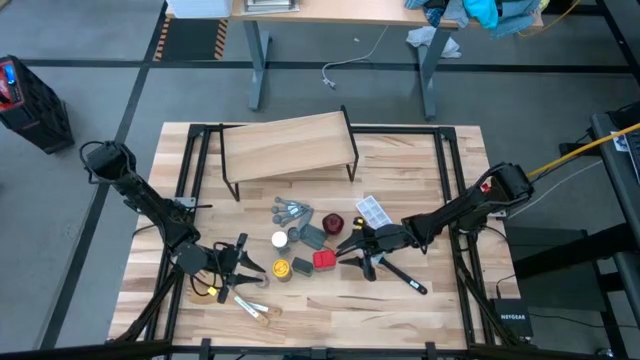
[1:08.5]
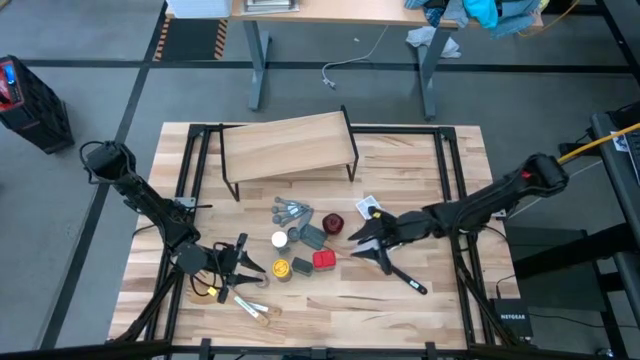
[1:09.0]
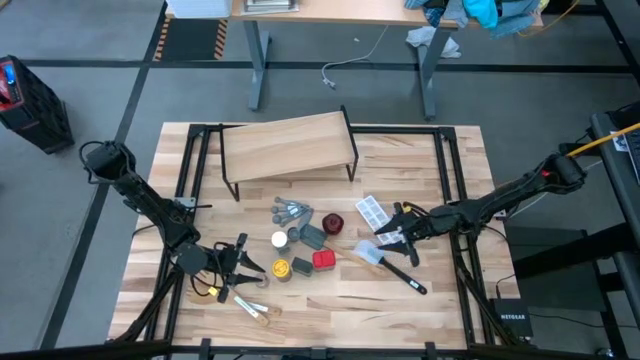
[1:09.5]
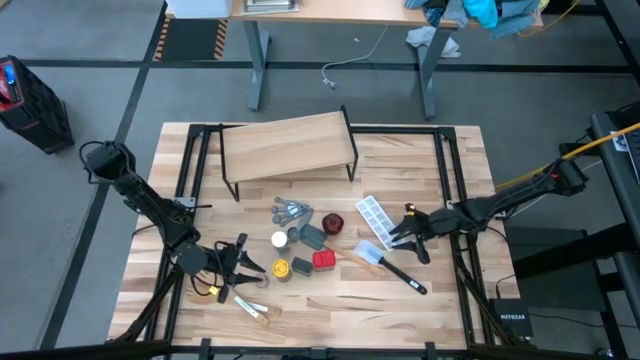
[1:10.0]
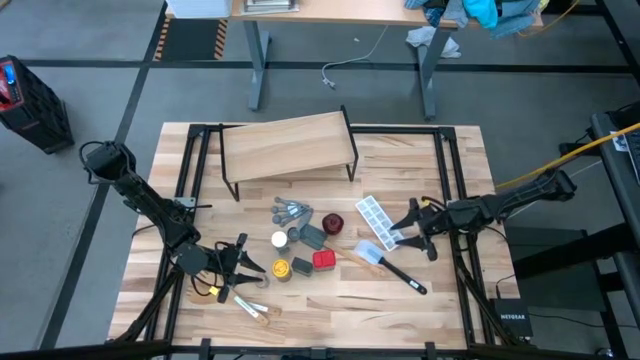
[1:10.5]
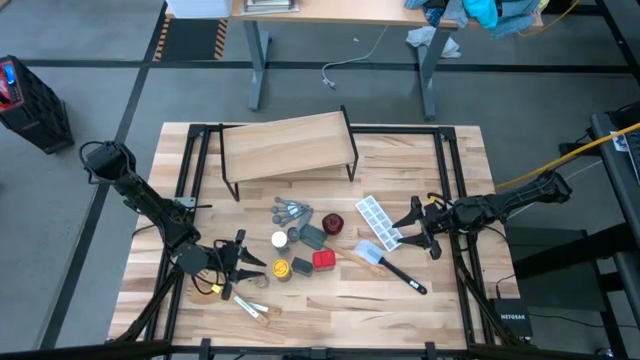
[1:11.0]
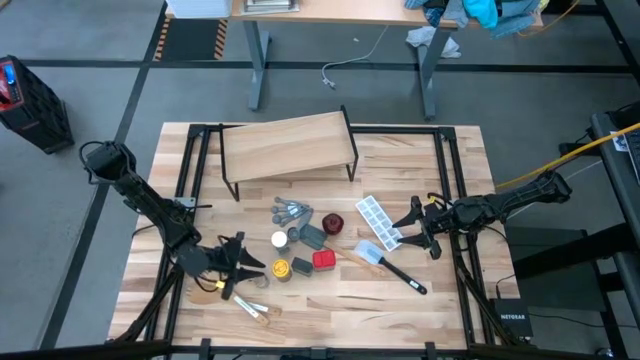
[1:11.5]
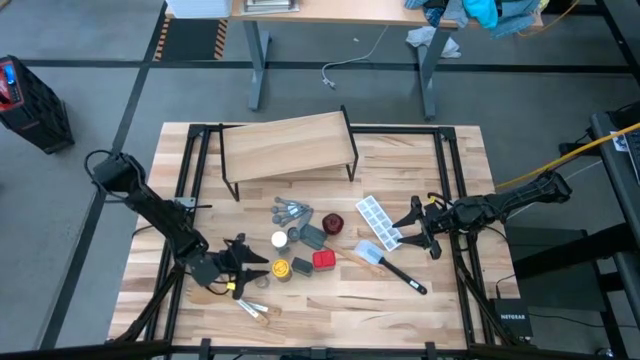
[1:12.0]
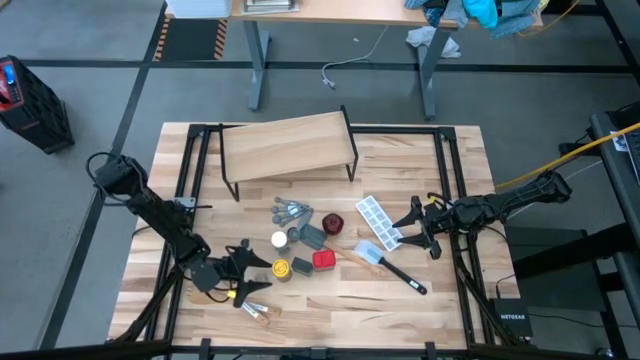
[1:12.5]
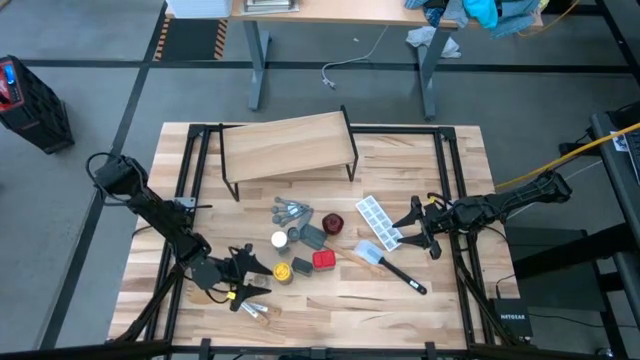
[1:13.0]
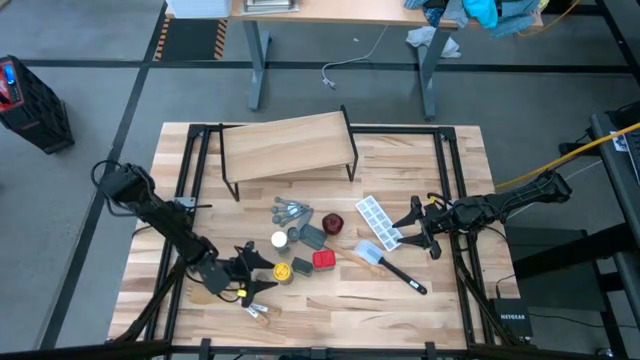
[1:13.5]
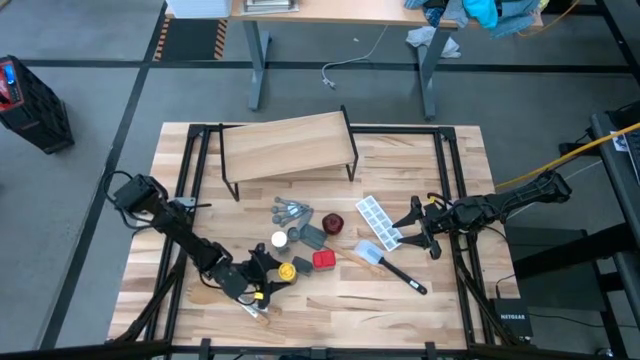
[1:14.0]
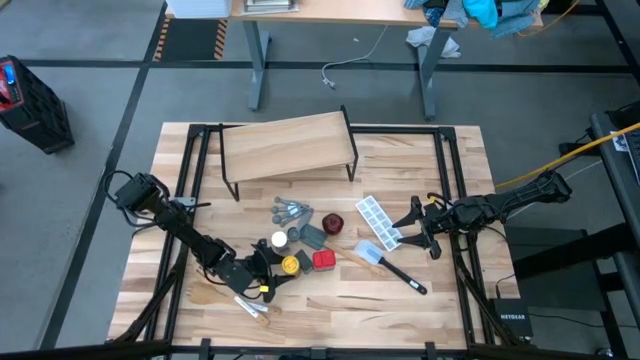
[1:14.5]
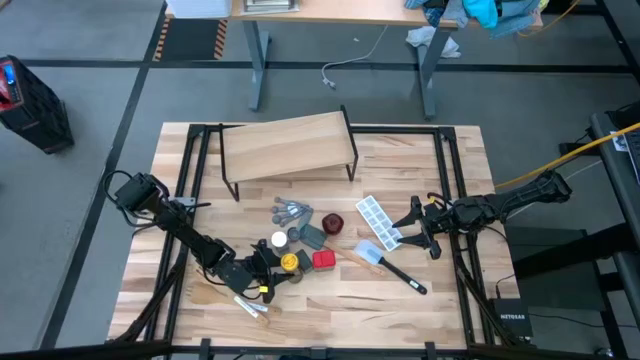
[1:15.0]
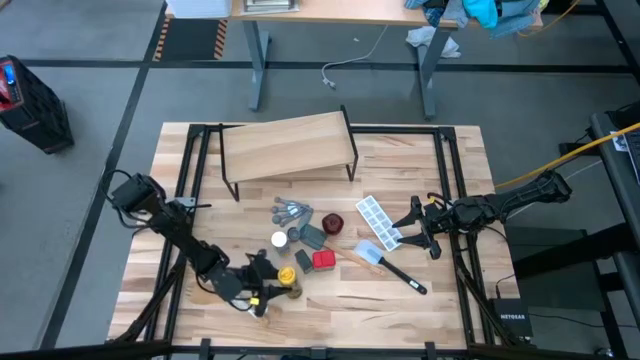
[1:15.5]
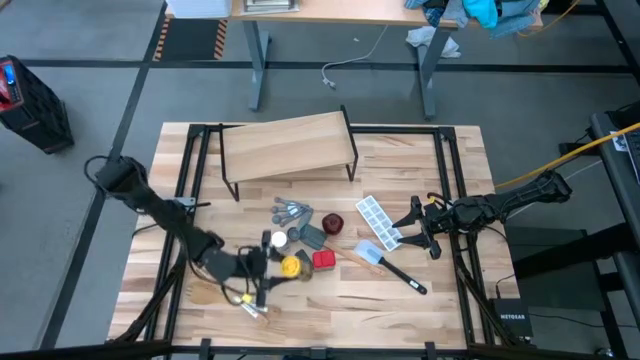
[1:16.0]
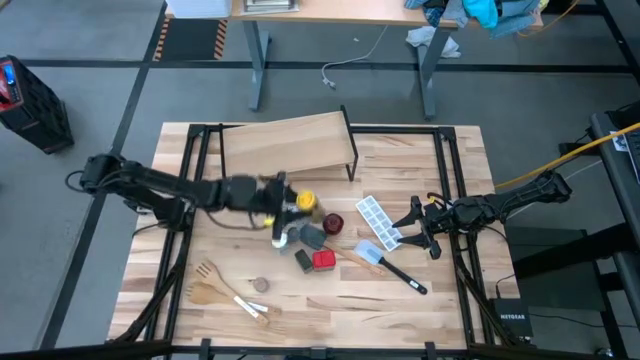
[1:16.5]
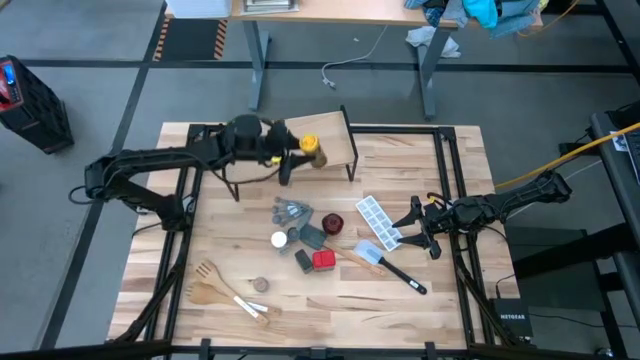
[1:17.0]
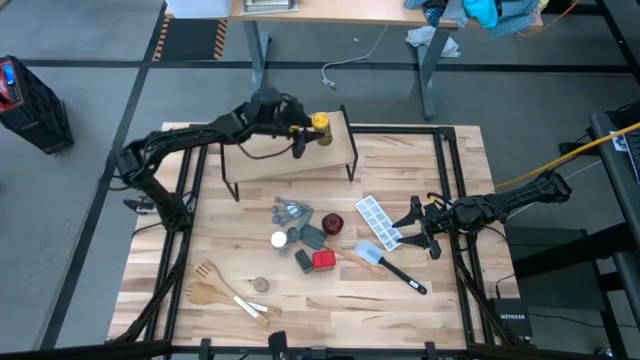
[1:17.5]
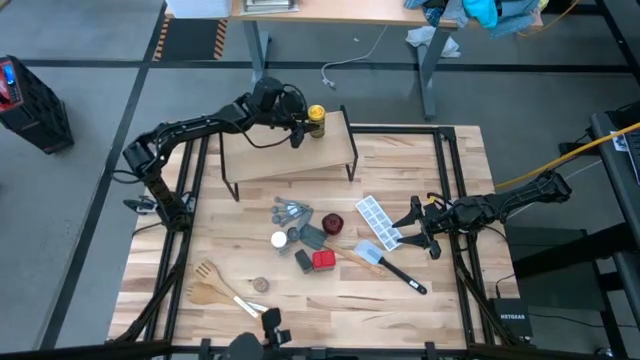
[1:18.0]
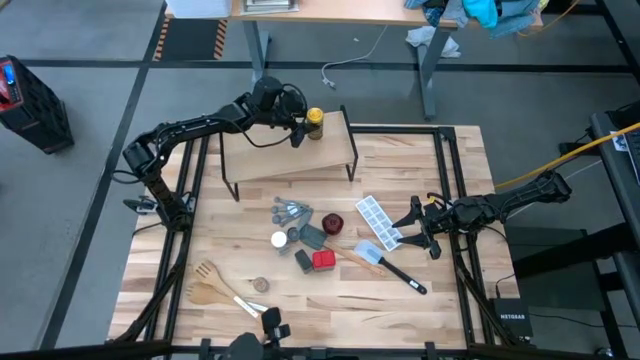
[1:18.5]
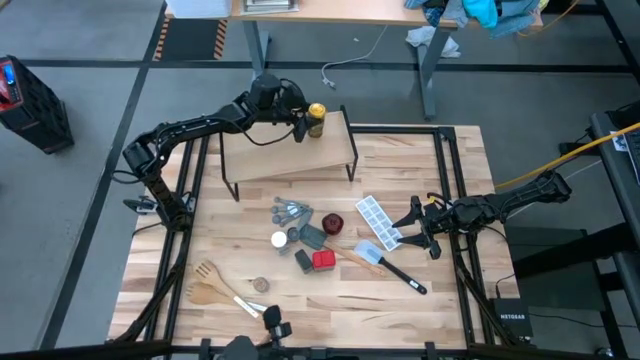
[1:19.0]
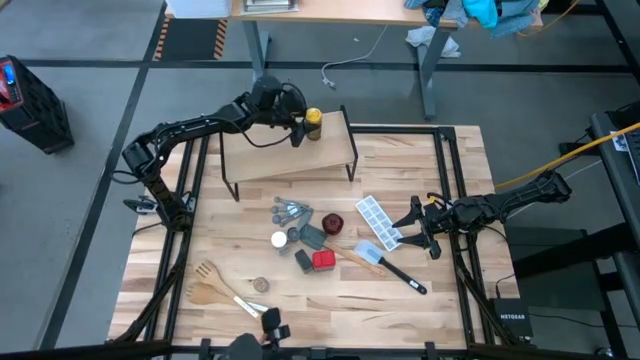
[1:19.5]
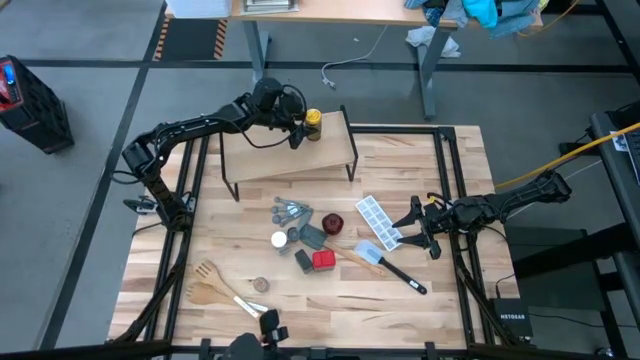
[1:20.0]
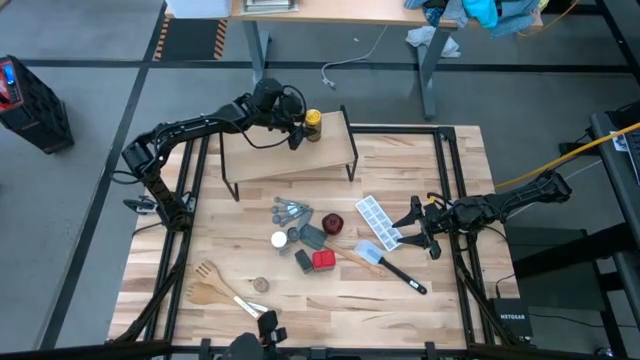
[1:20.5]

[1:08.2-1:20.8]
Task: Shelf spices
Put the yellow seasoning bottle on the shelf

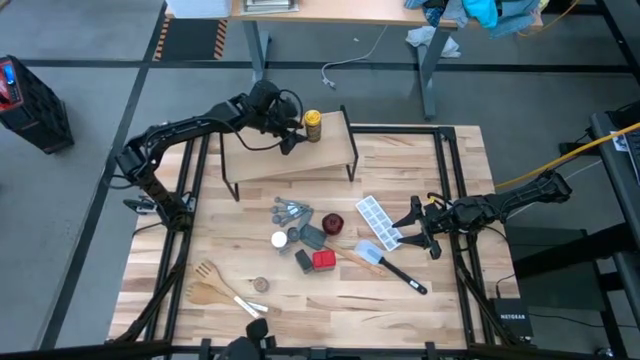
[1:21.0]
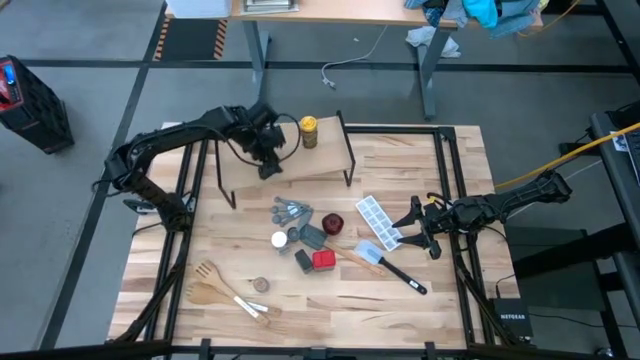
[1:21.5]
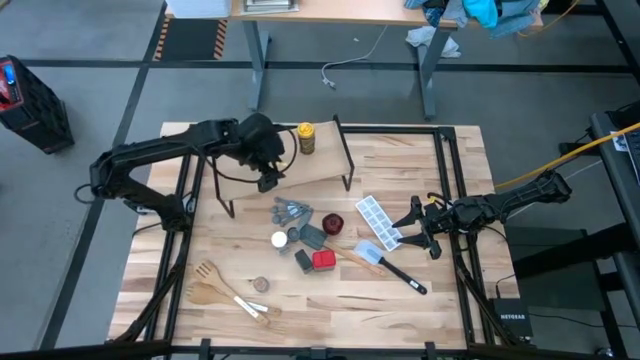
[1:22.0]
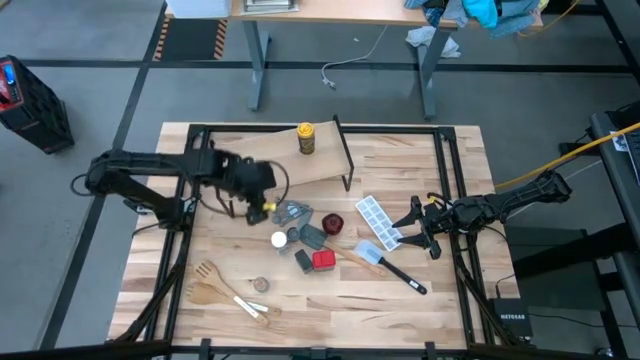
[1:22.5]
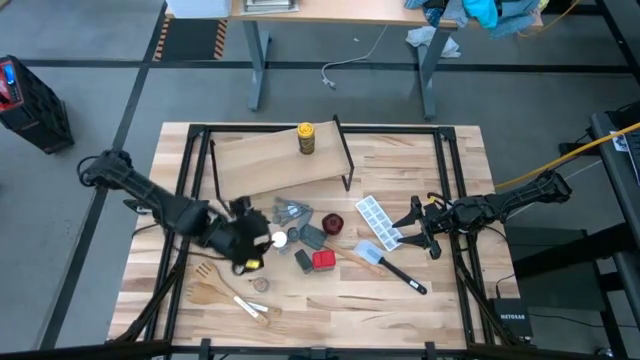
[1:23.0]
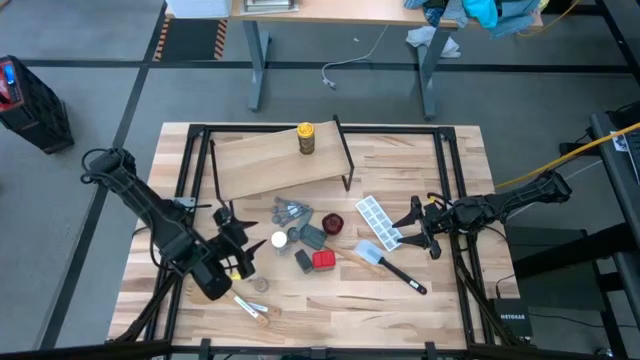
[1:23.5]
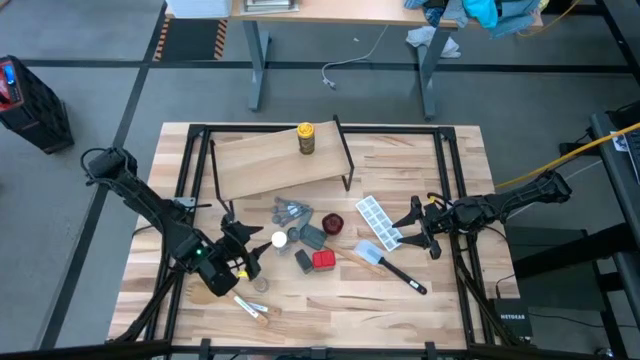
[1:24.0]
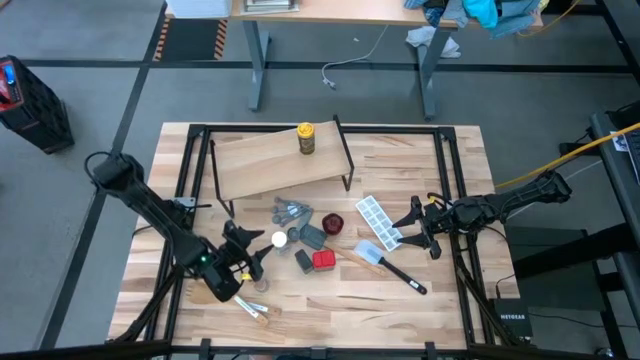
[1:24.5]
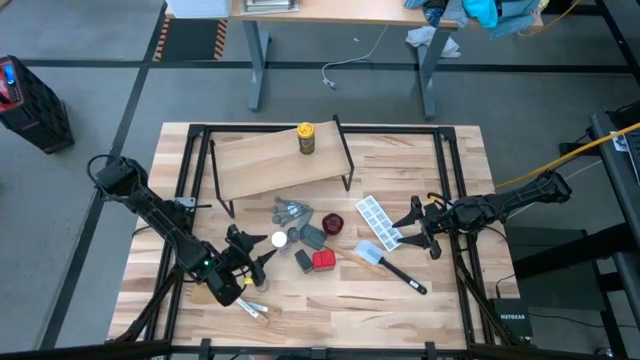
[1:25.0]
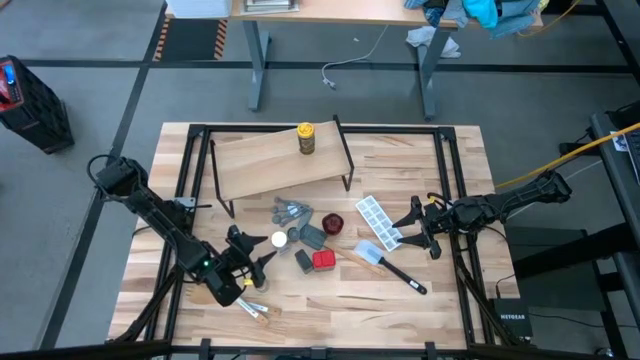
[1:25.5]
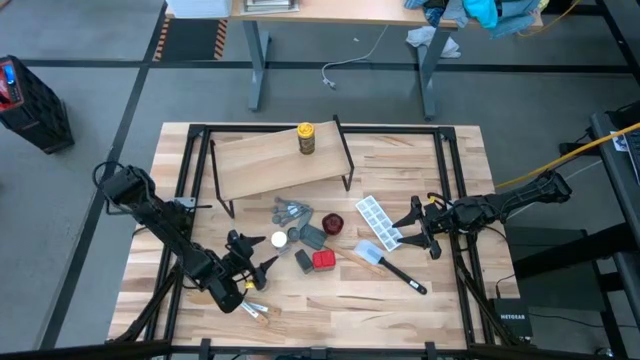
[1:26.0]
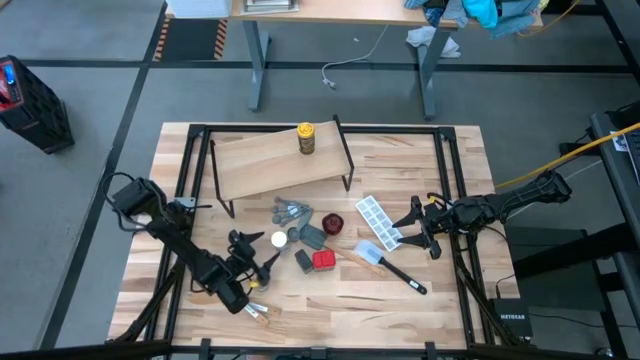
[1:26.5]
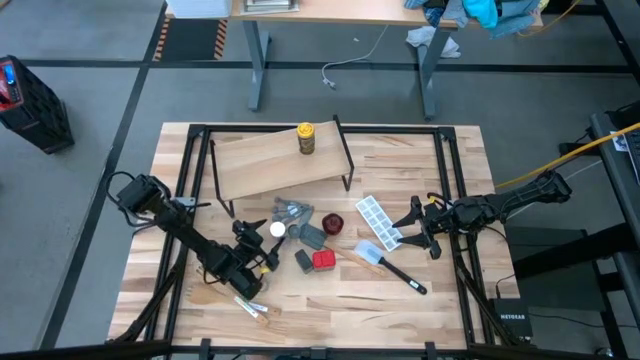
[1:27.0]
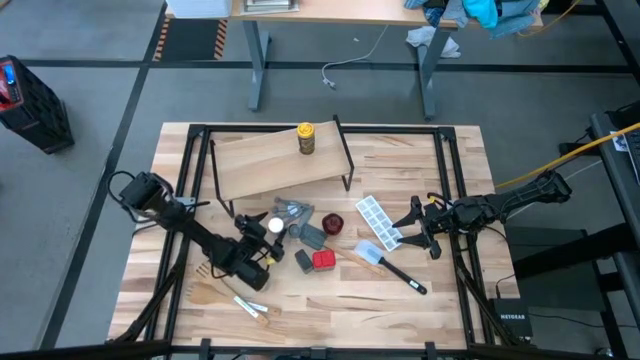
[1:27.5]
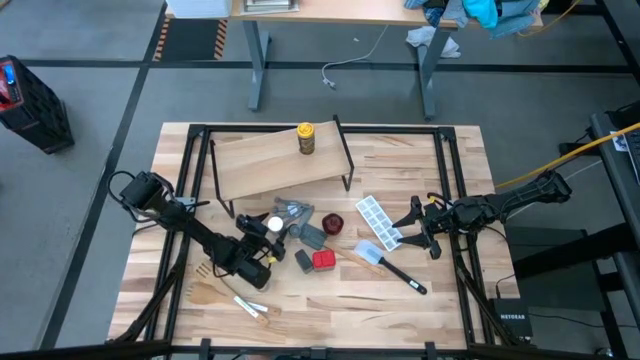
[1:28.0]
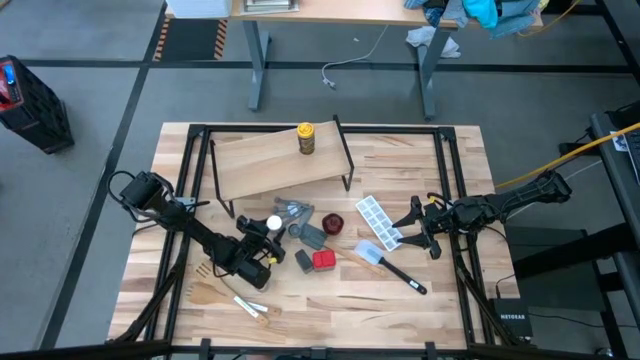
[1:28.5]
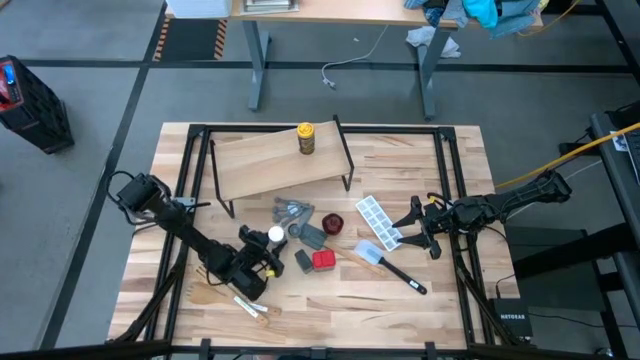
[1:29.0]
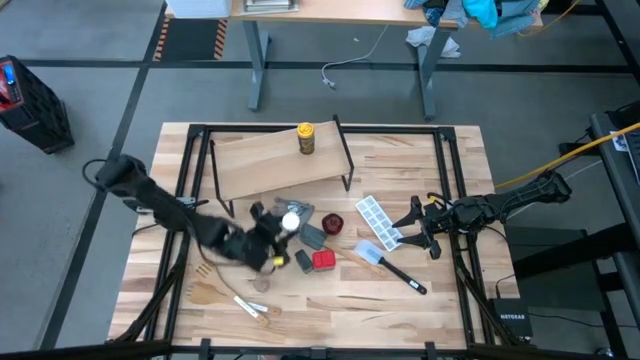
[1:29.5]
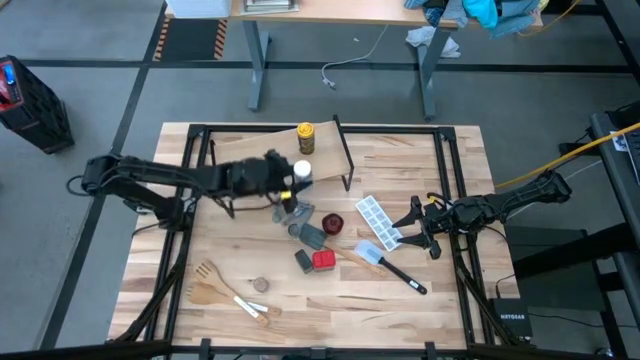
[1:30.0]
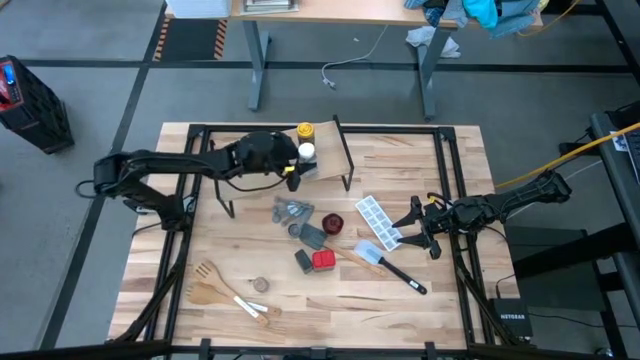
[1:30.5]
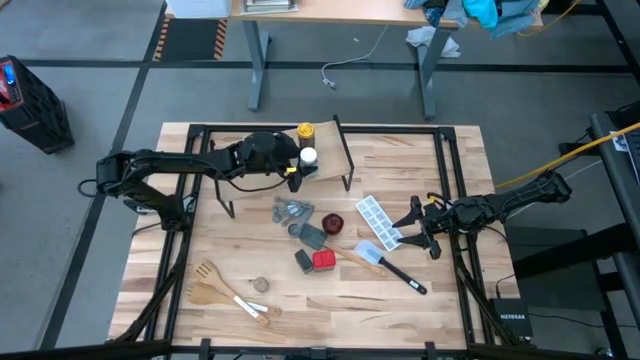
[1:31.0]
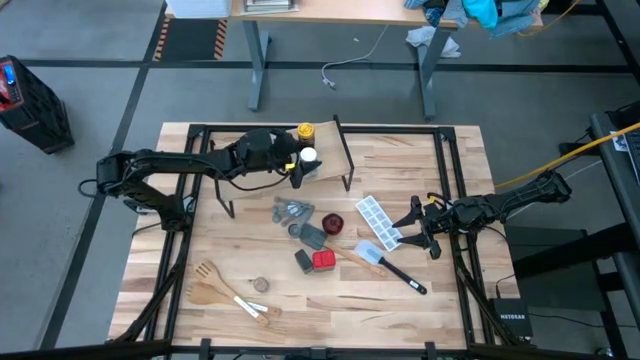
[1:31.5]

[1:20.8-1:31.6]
Put the white seasoning bottle on the shelf
